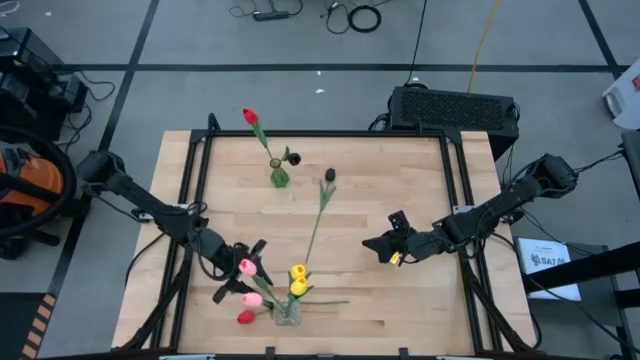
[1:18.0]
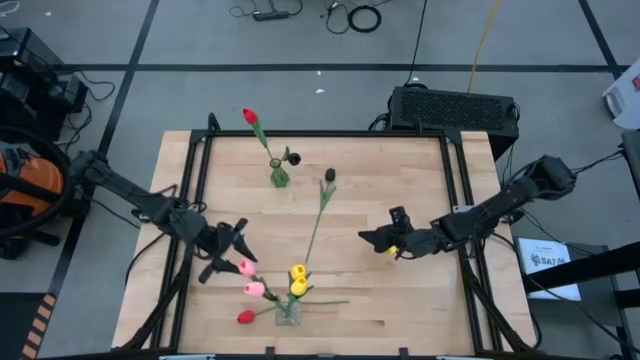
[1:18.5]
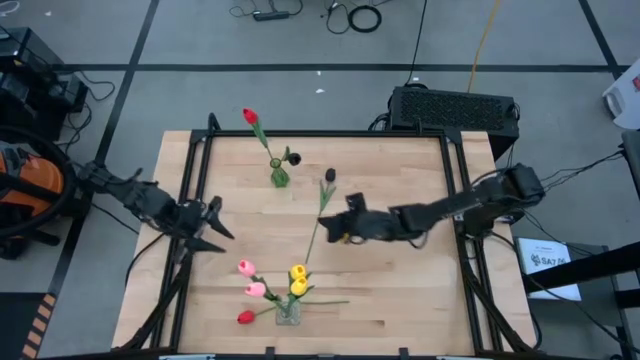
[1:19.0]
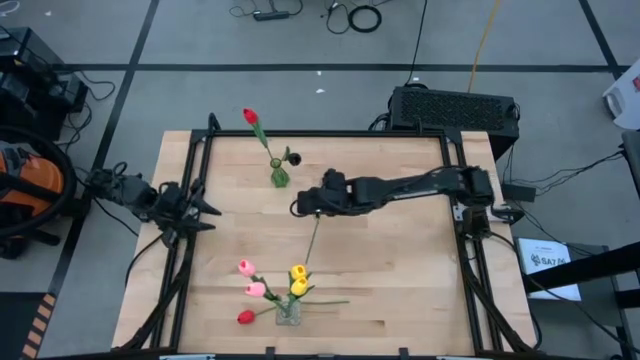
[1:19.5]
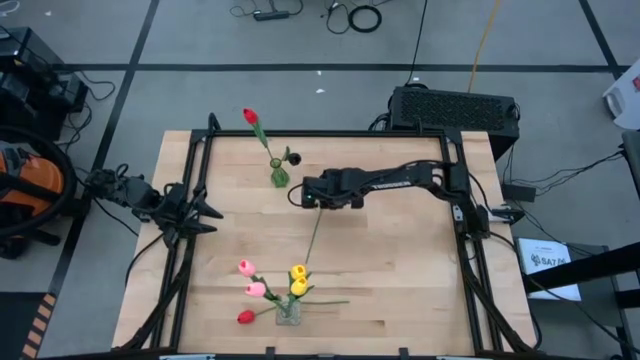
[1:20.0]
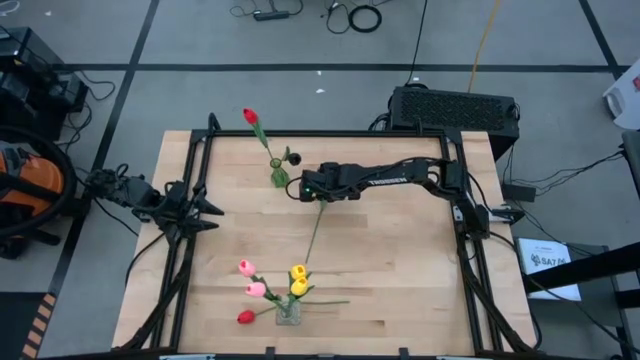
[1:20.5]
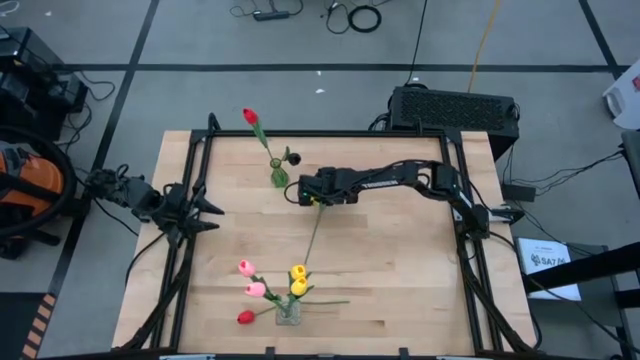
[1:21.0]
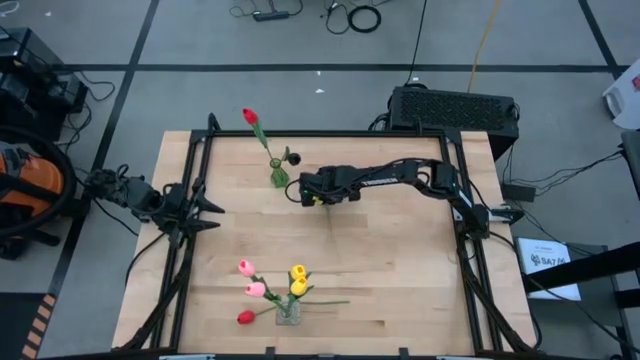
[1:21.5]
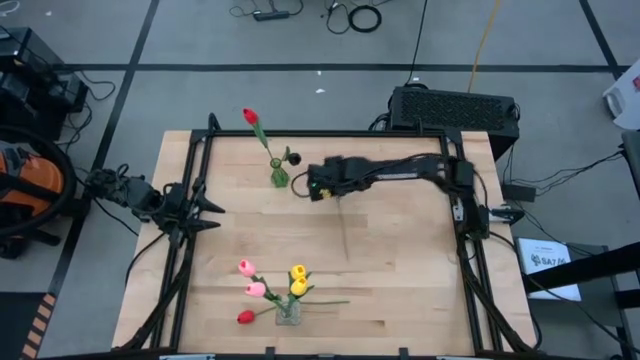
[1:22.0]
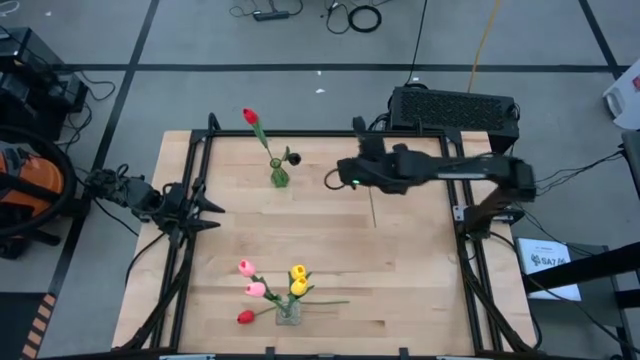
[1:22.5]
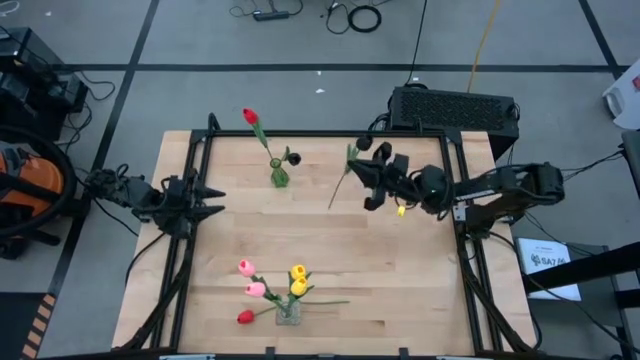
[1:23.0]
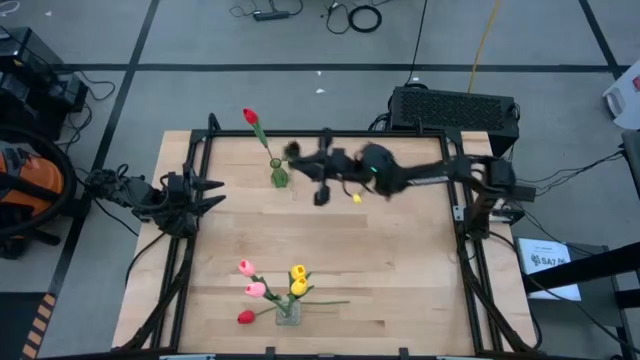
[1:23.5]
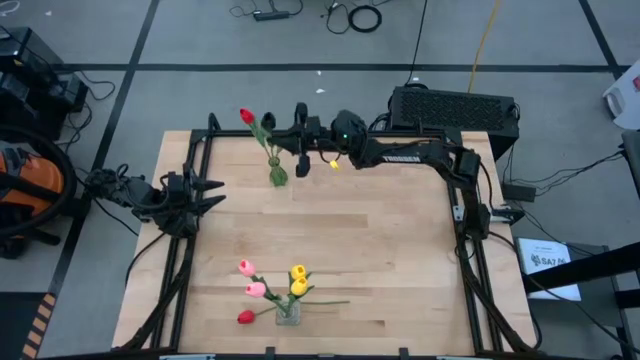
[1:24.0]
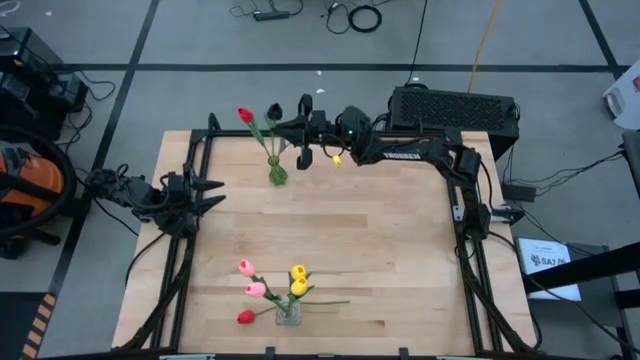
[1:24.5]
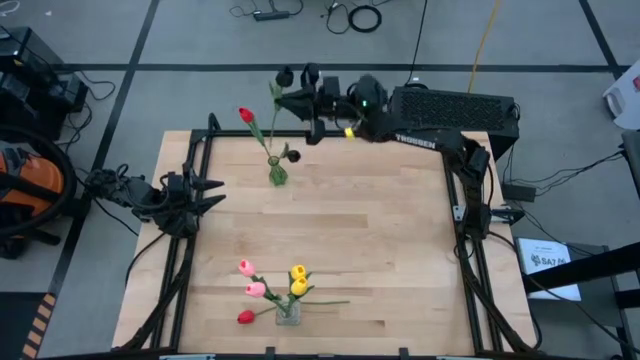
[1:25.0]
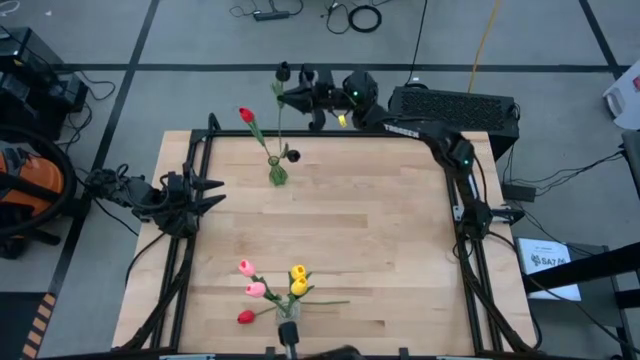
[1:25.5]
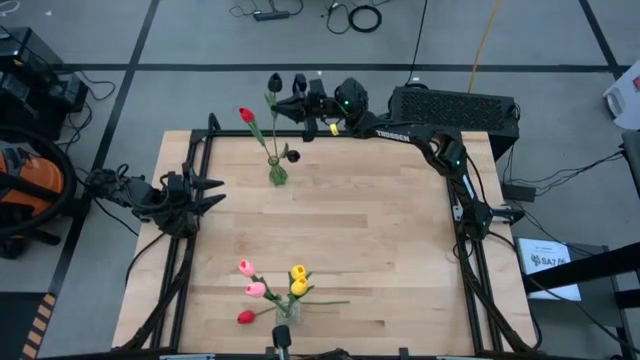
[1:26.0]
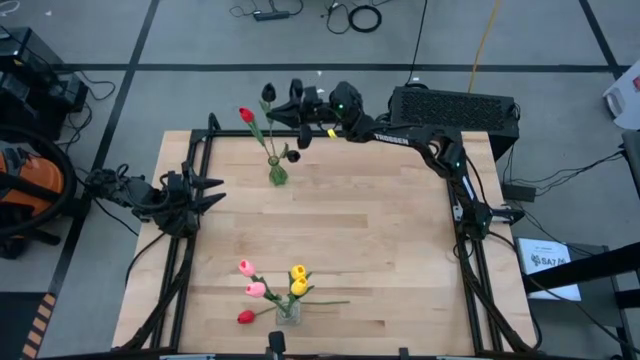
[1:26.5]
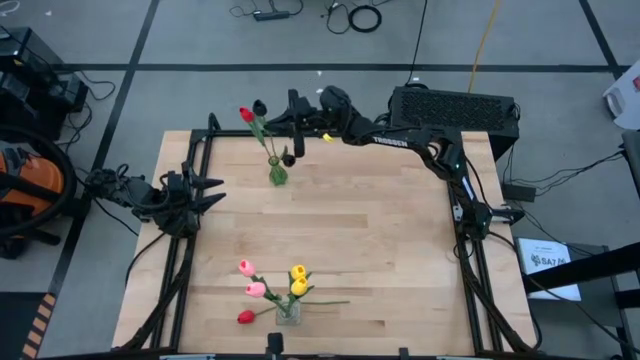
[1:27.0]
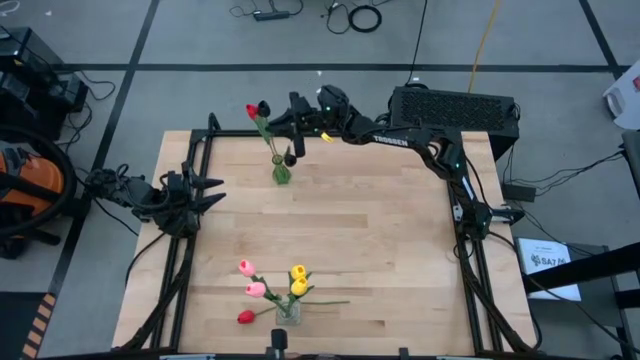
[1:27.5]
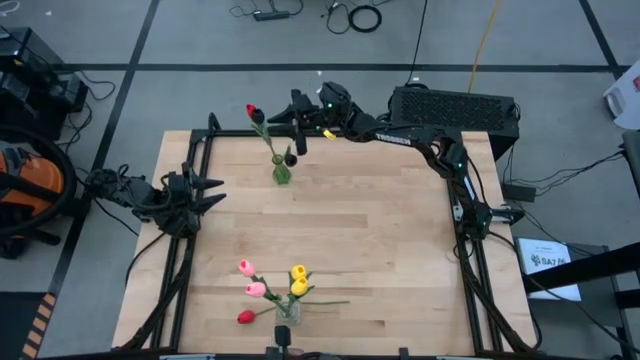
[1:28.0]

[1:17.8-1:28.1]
Task: Sort flowers into vase by color
Put the black flower into the green vase

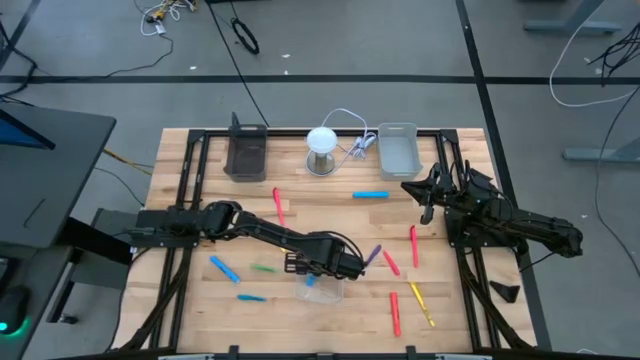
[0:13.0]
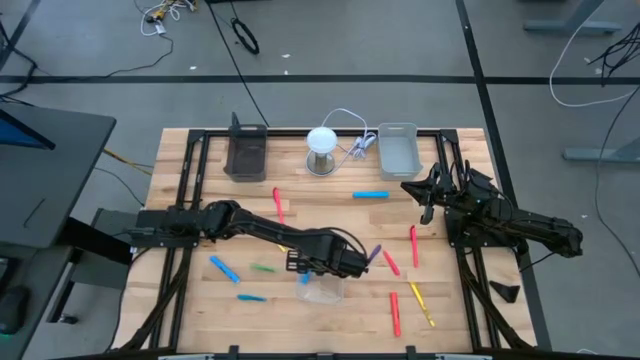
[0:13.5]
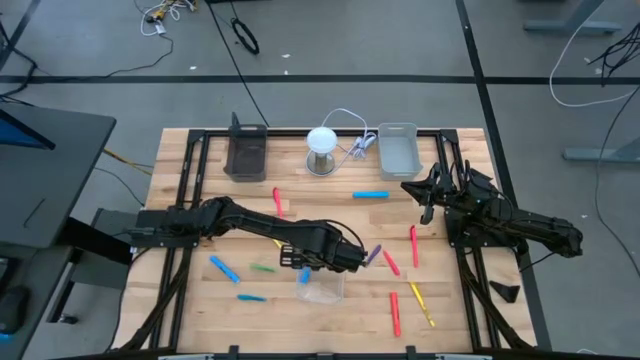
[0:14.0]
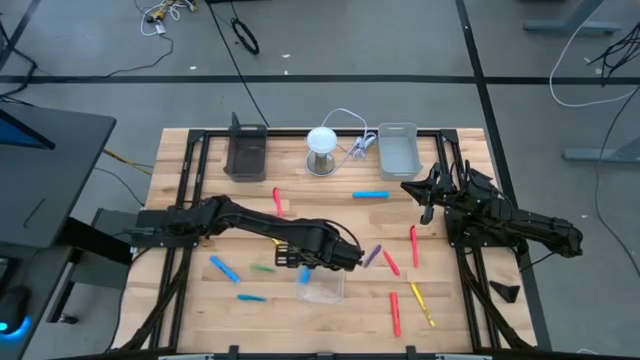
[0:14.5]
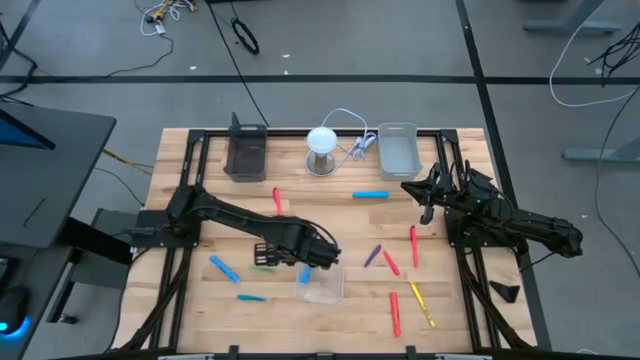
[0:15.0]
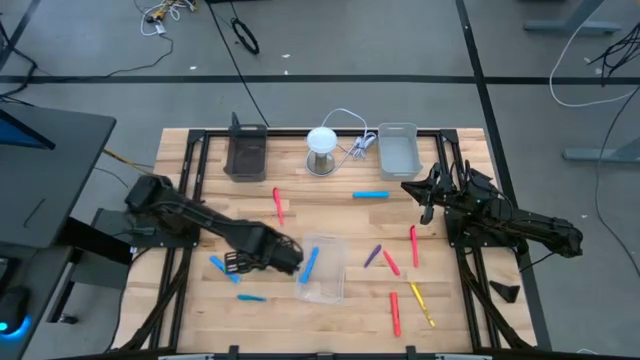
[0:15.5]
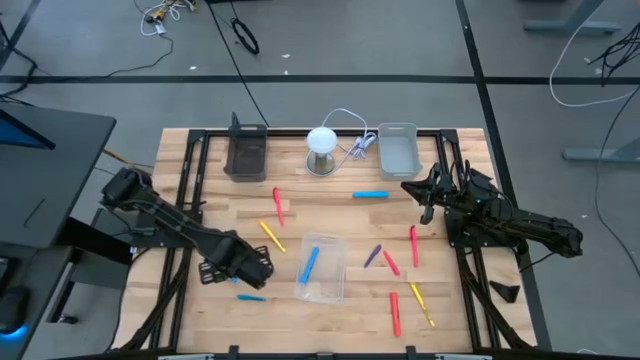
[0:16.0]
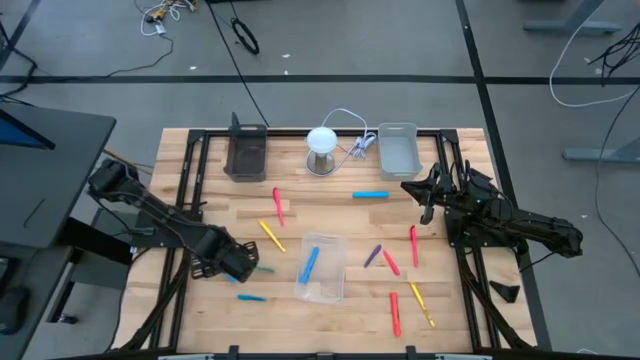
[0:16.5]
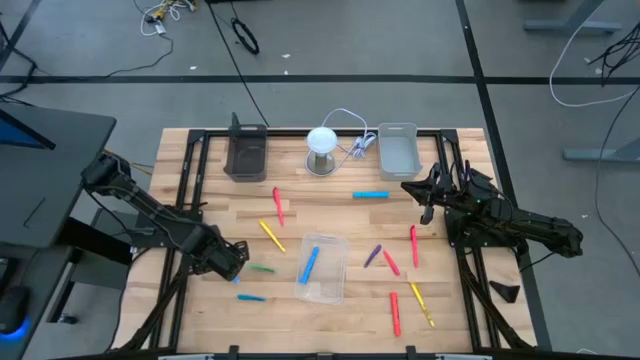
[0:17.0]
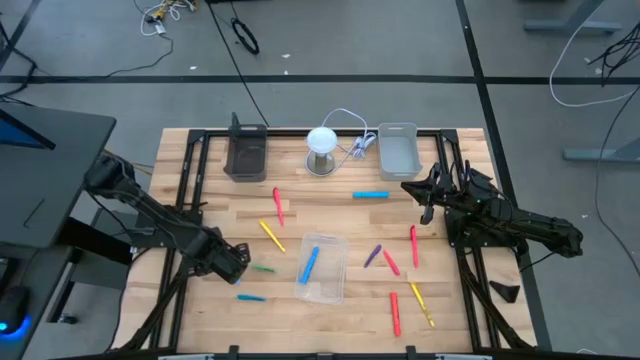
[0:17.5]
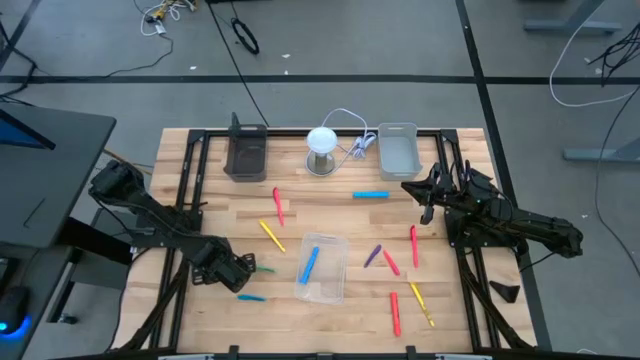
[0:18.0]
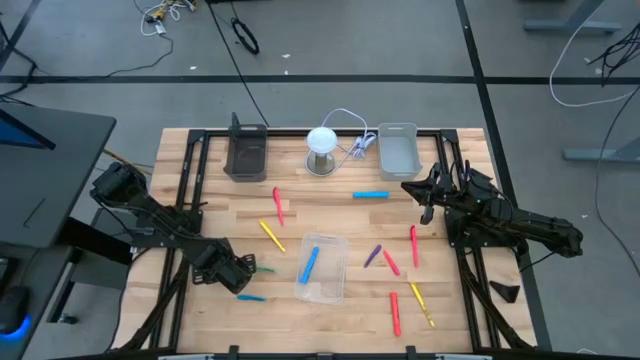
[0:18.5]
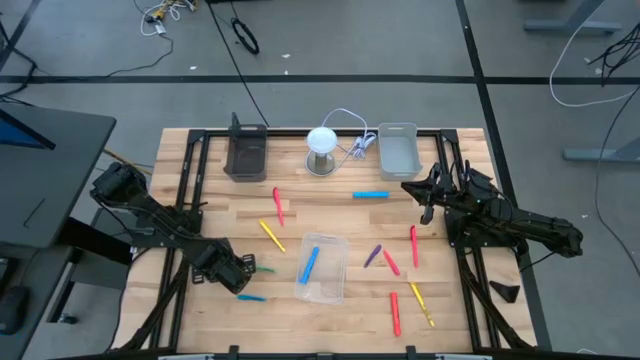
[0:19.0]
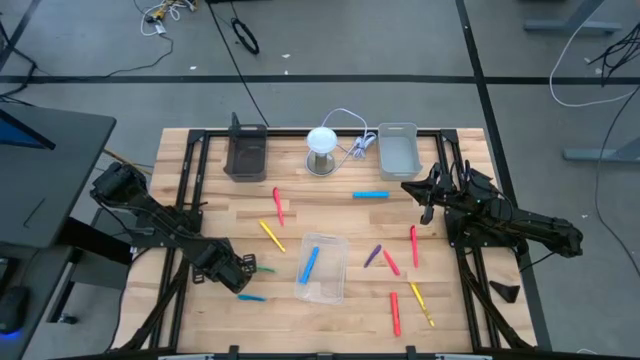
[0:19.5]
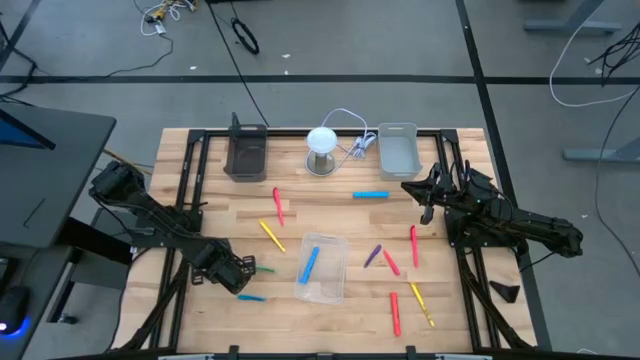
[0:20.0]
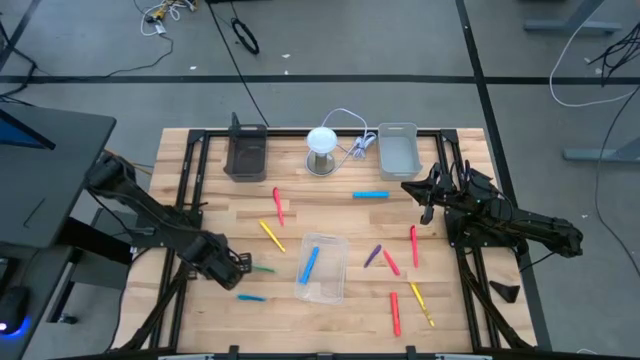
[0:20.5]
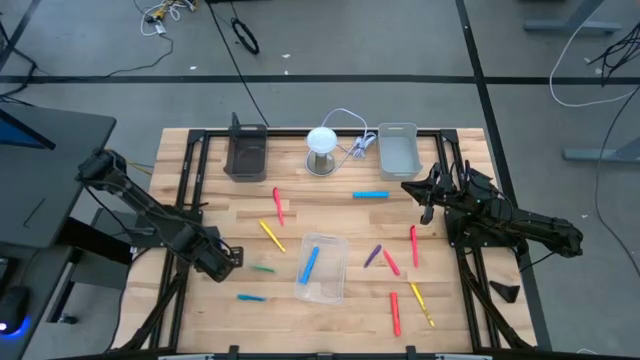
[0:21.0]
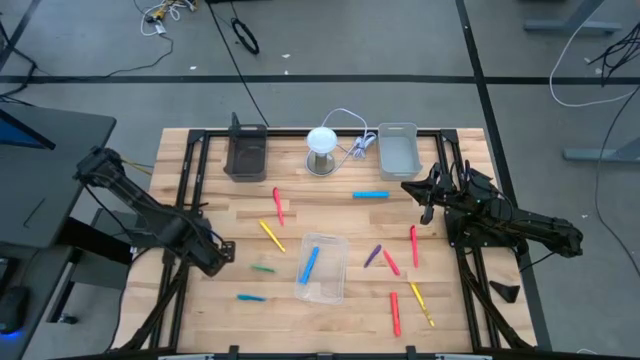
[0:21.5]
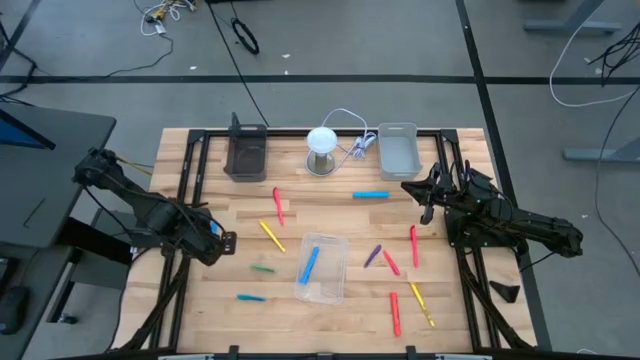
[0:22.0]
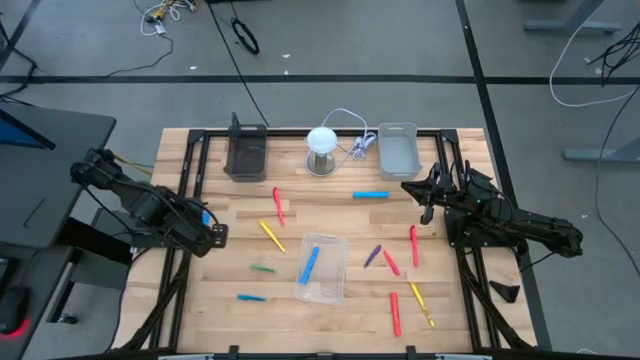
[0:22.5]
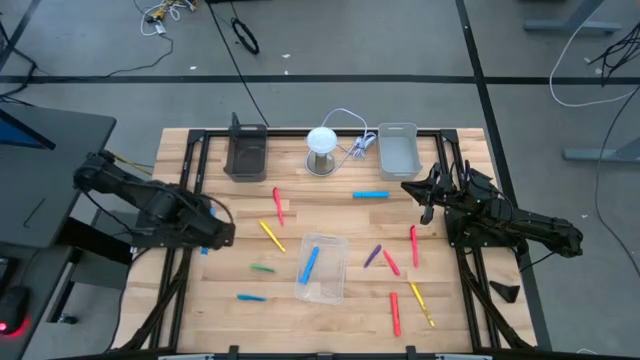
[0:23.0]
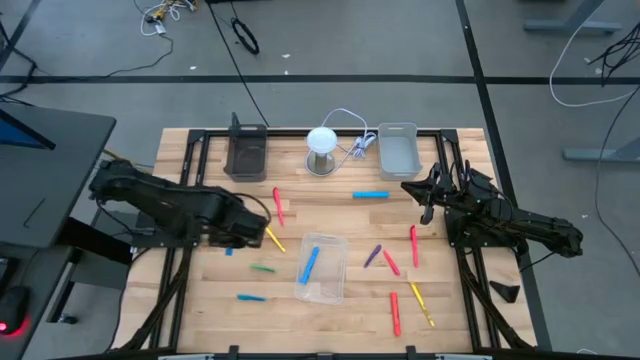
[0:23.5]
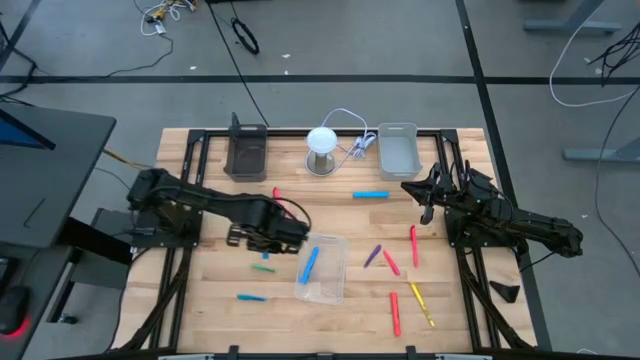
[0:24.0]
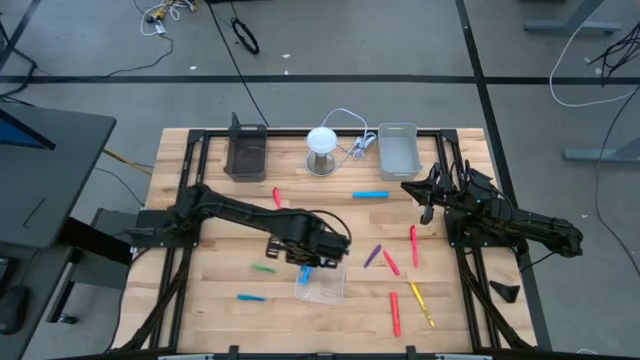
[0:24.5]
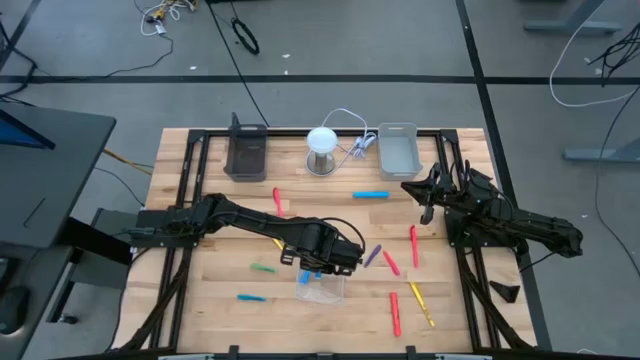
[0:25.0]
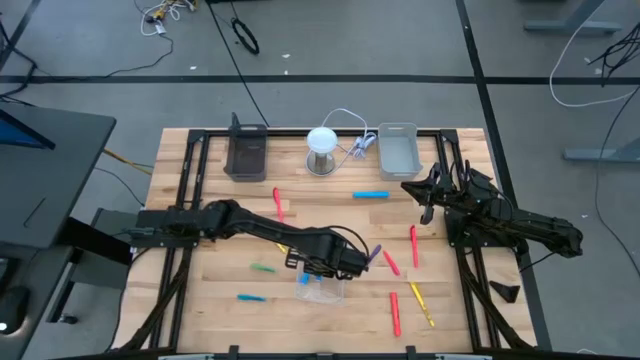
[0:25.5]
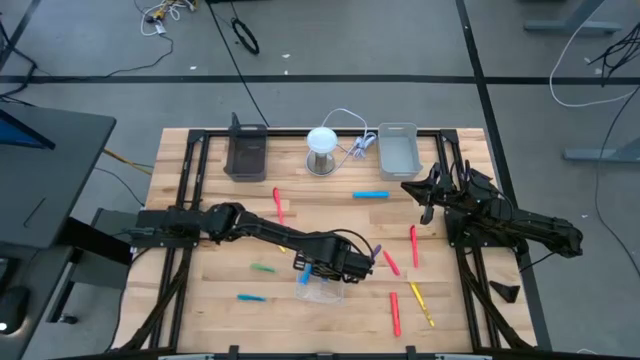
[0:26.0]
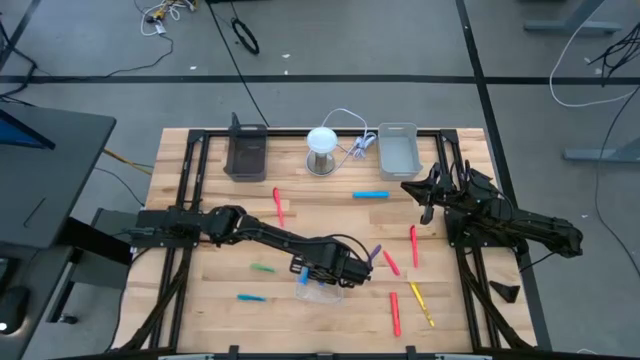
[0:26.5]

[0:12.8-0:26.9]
Task: Pick & Place Markers
Put the bottom blue highlighter into the transparent bin
